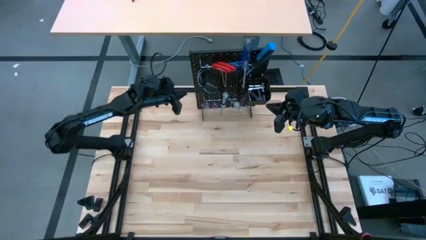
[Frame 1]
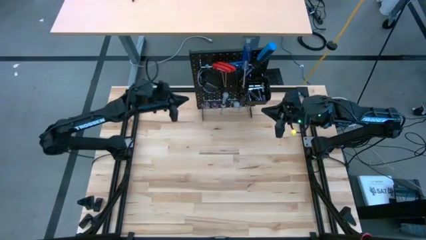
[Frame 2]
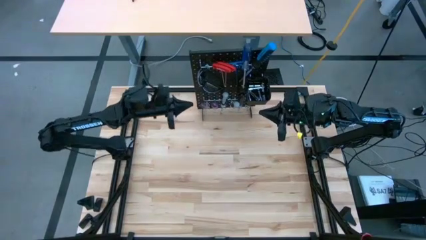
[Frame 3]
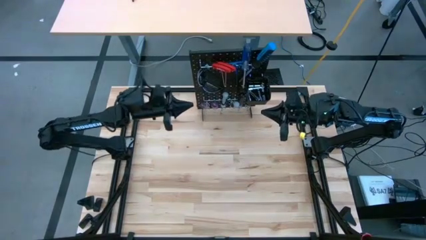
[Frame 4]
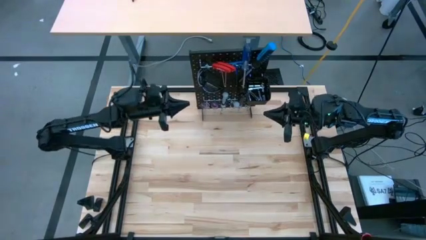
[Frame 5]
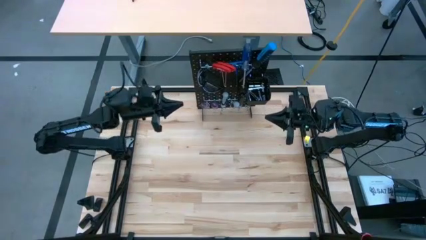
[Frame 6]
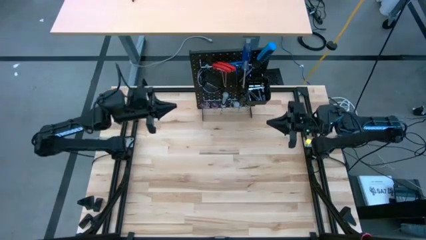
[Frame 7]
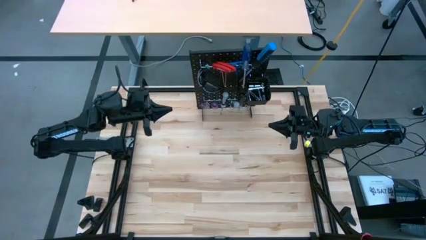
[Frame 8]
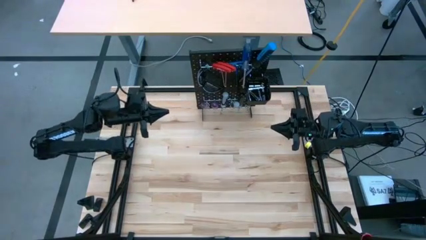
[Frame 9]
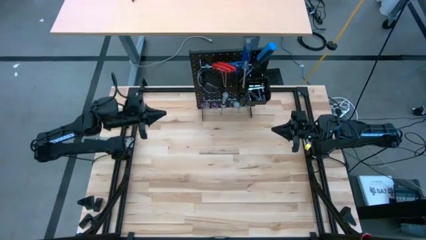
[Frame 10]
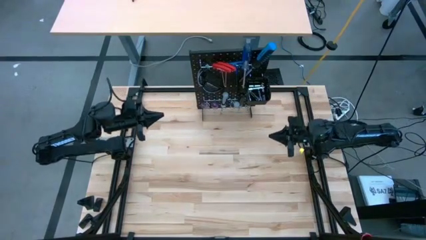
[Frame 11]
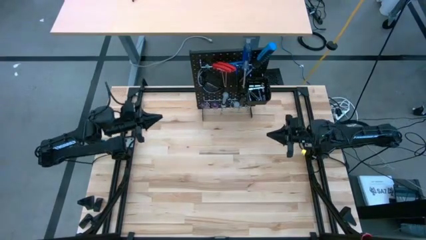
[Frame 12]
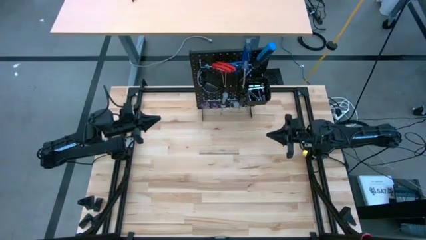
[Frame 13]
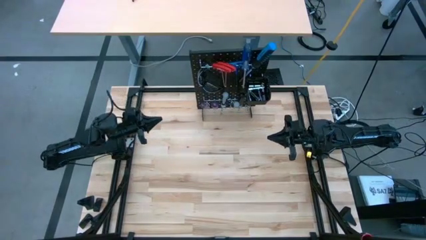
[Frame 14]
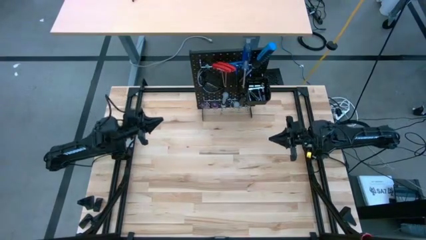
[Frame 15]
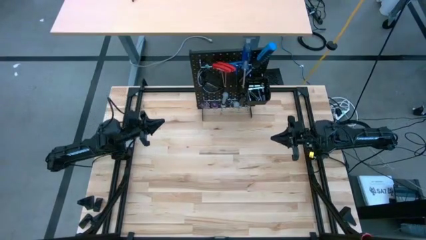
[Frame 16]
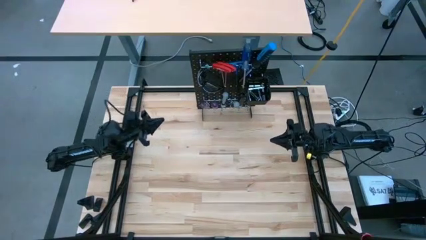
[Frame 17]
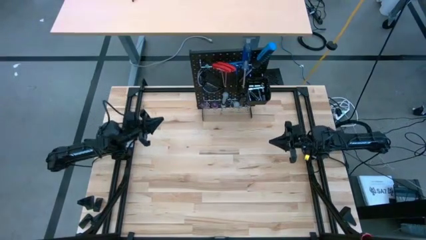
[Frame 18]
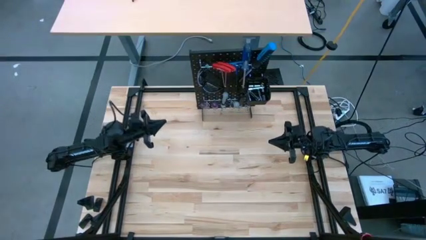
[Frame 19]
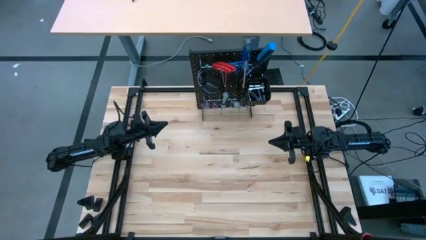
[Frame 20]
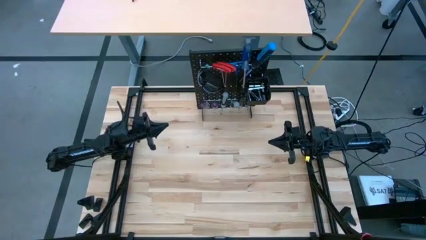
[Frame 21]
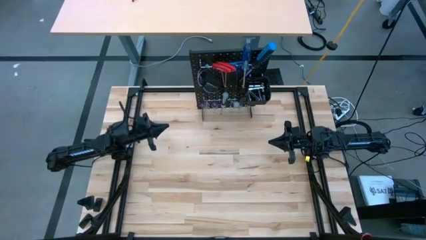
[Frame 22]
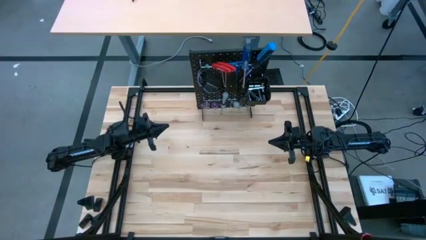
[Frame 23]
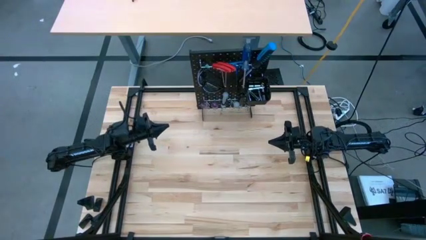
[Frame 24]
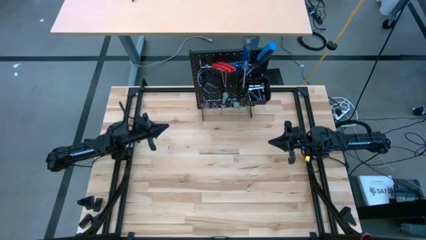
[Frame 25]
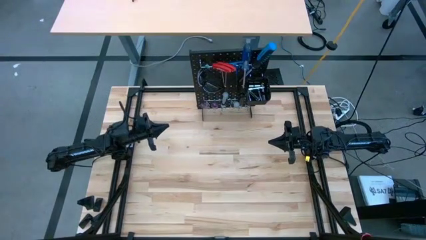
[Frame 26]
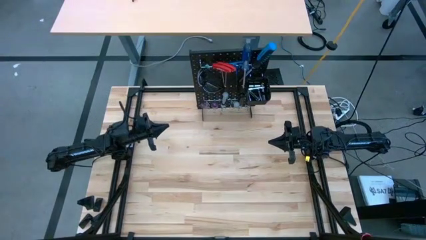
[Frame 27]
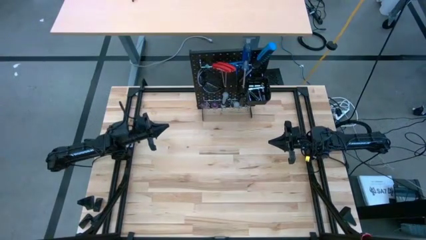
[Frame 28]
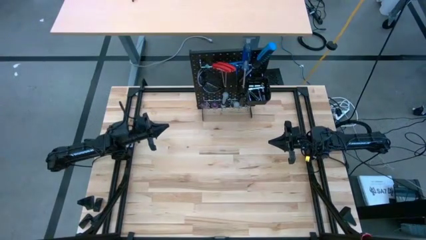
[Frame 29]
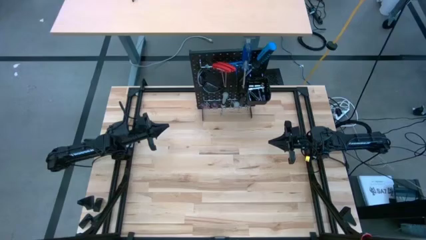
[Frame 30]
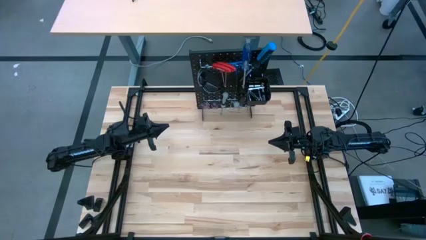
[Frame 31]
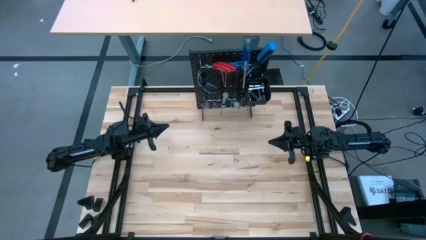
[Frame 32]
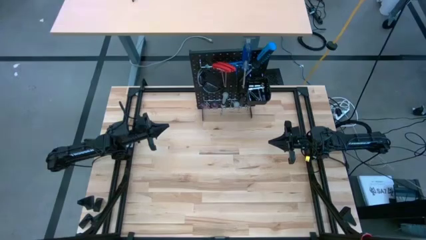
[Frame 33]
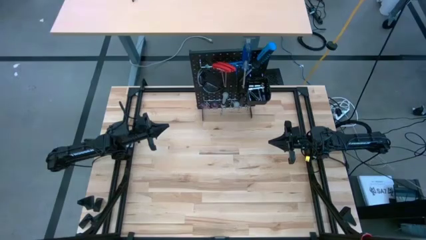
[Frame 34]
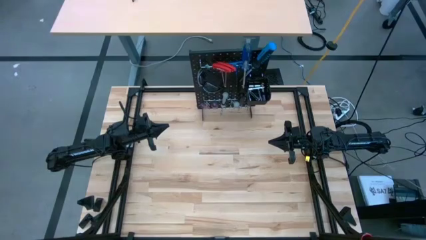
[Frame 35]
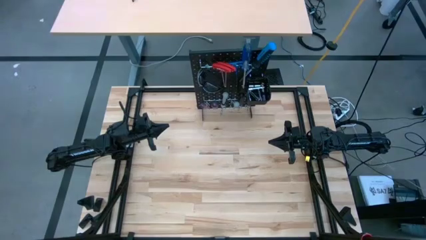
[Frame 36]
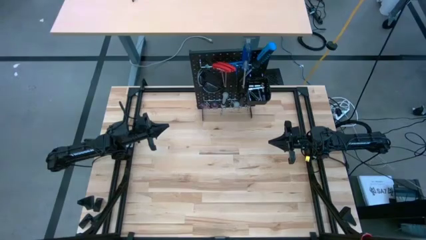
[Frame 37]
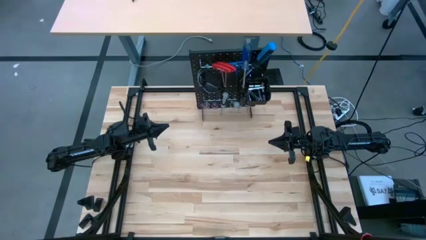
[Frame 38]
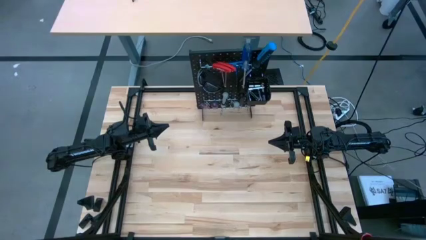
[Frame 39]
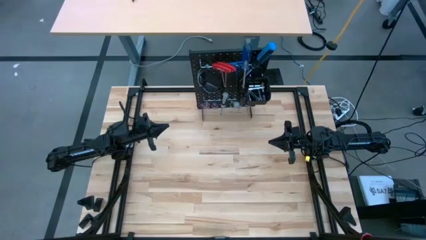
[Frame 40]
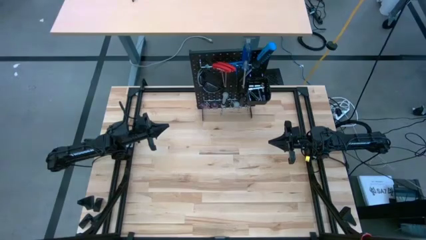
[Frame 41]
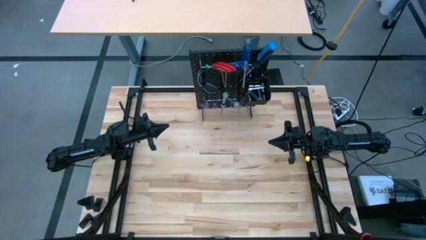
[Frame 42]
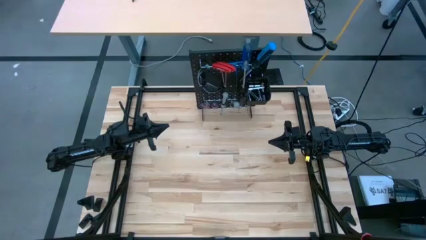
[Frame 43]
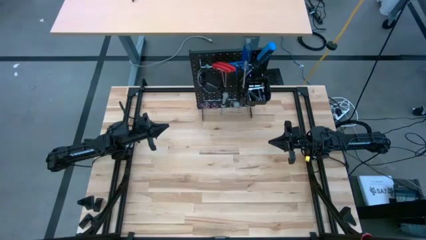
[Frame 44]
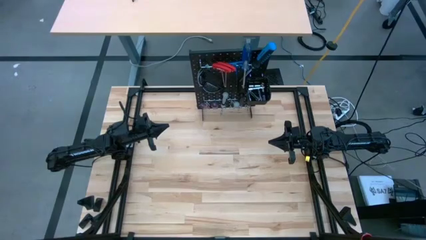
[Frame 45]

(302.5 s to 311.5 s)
Task: Hang tools onto peg board
Return to Home Position

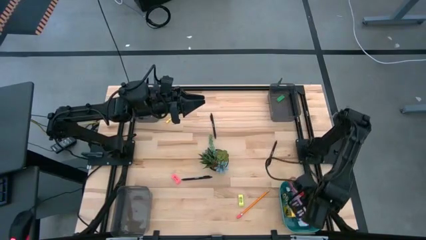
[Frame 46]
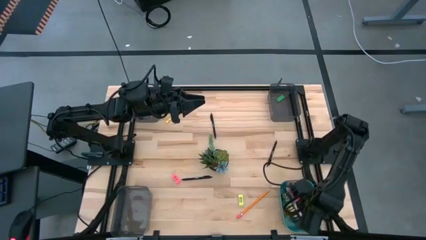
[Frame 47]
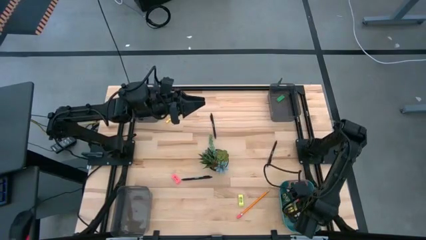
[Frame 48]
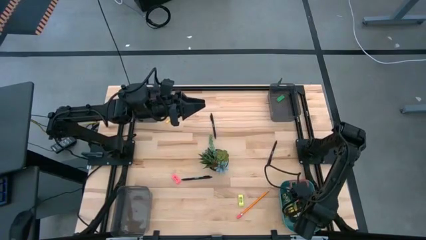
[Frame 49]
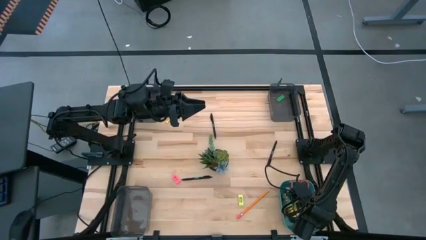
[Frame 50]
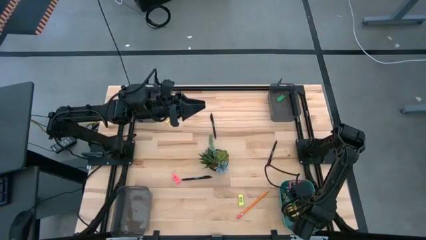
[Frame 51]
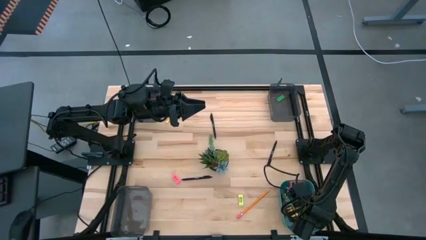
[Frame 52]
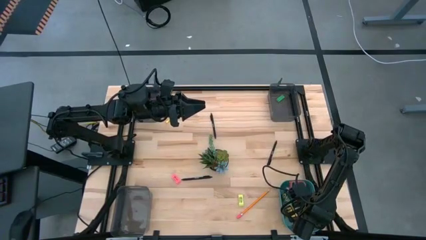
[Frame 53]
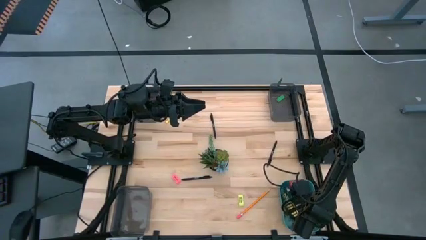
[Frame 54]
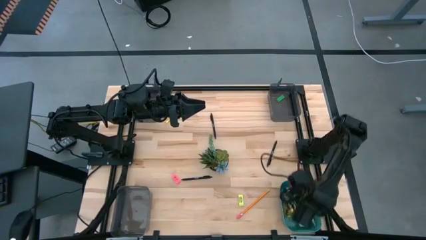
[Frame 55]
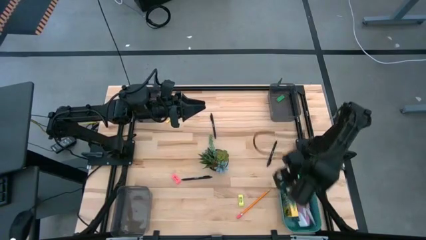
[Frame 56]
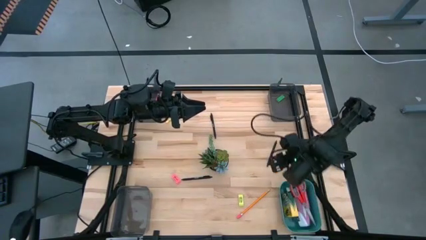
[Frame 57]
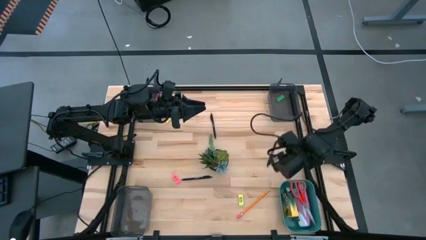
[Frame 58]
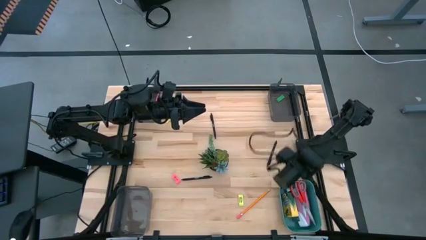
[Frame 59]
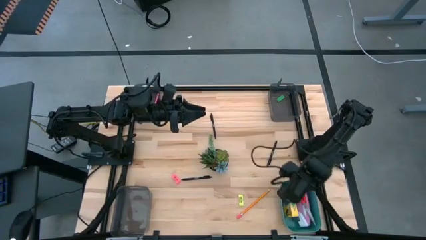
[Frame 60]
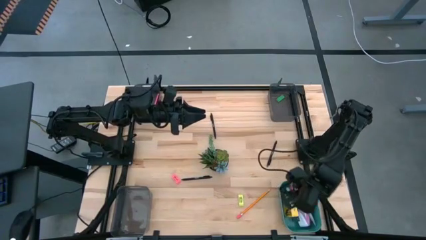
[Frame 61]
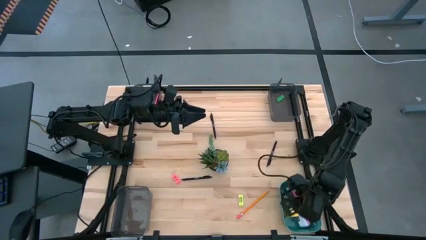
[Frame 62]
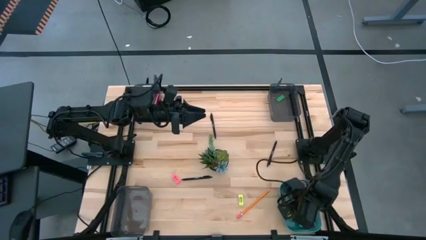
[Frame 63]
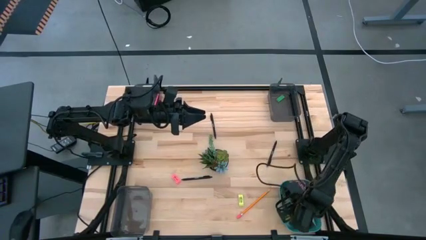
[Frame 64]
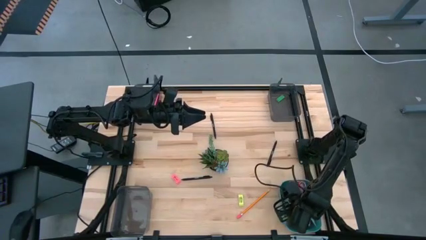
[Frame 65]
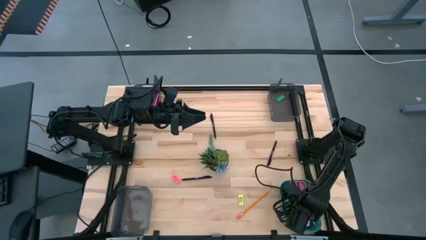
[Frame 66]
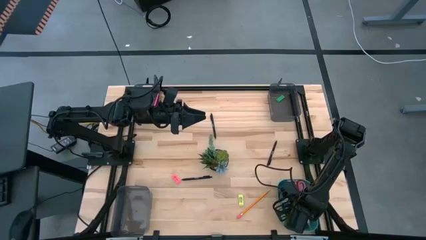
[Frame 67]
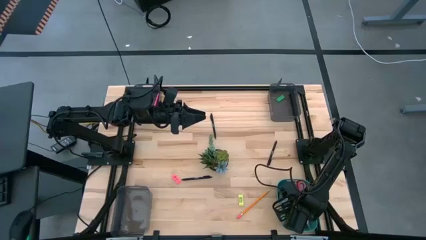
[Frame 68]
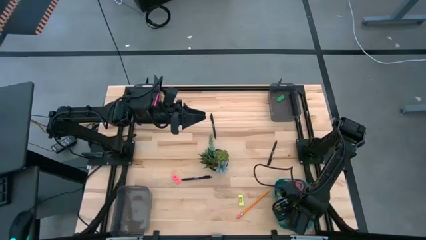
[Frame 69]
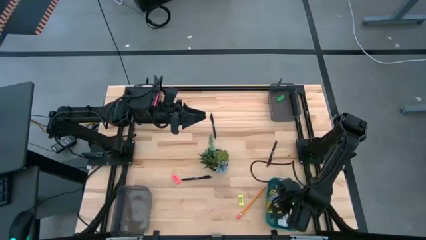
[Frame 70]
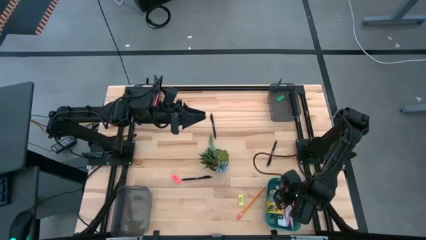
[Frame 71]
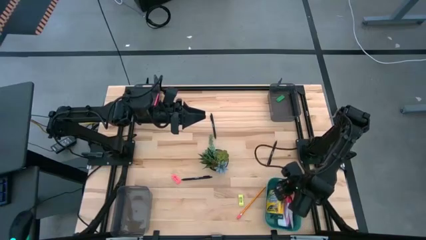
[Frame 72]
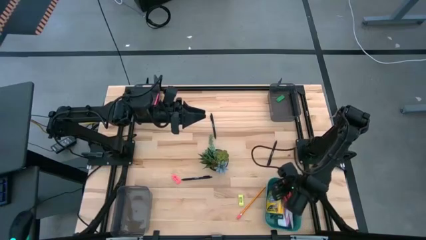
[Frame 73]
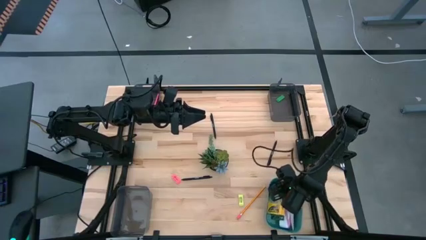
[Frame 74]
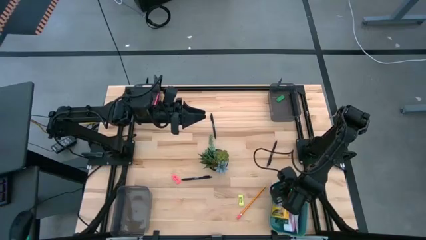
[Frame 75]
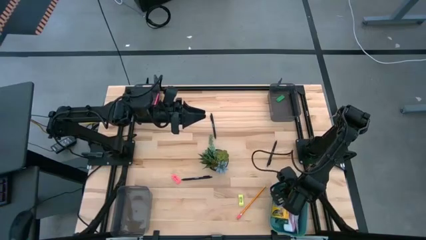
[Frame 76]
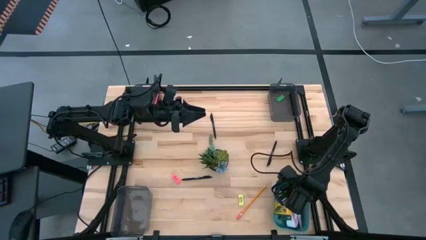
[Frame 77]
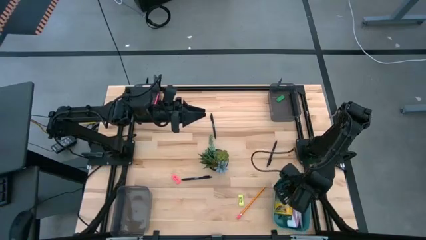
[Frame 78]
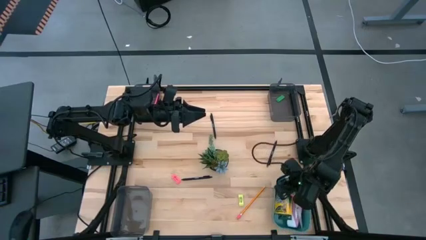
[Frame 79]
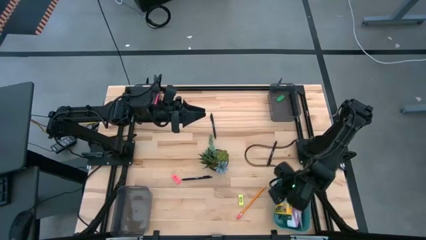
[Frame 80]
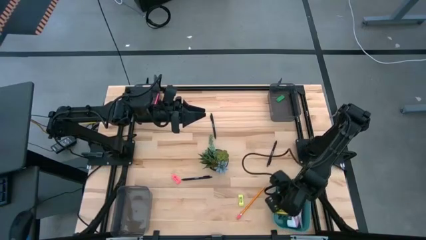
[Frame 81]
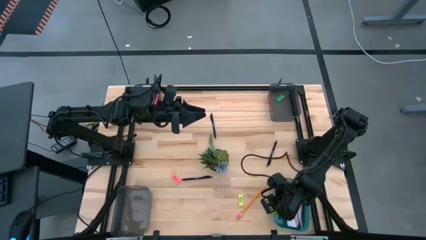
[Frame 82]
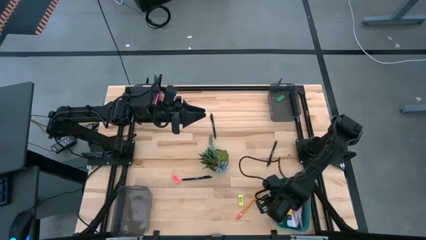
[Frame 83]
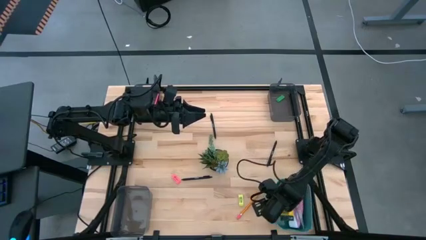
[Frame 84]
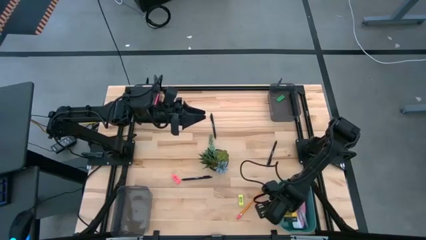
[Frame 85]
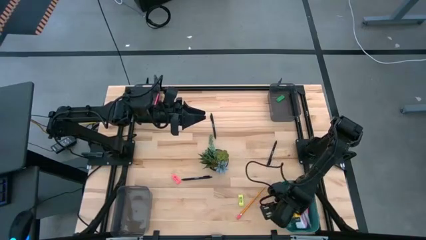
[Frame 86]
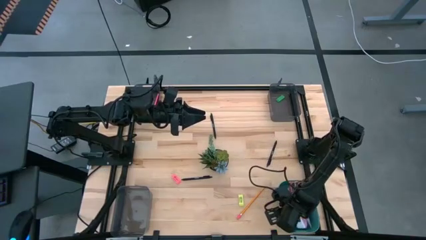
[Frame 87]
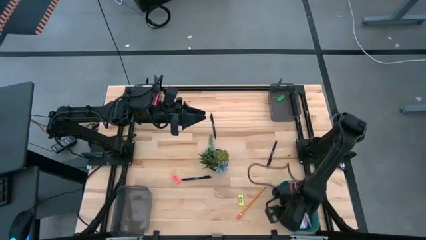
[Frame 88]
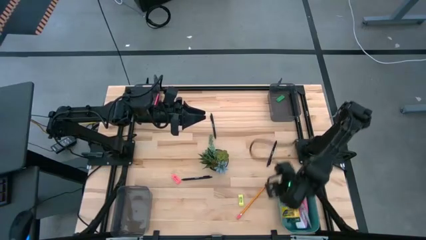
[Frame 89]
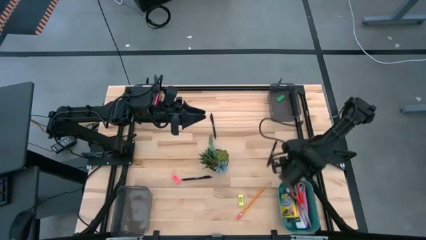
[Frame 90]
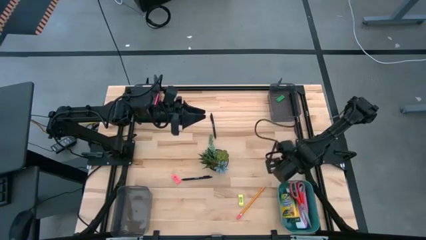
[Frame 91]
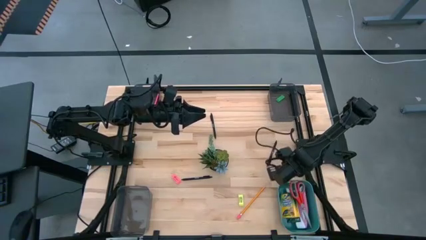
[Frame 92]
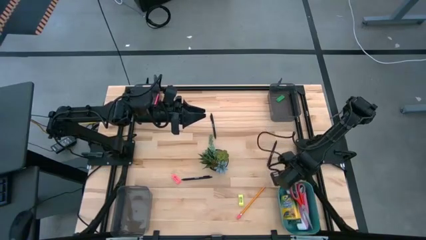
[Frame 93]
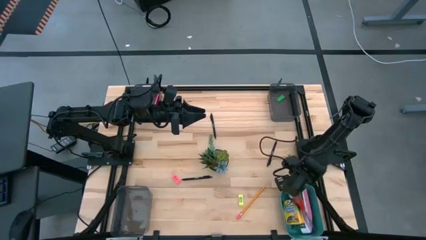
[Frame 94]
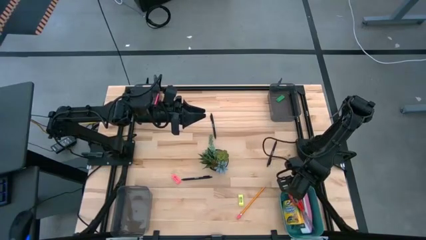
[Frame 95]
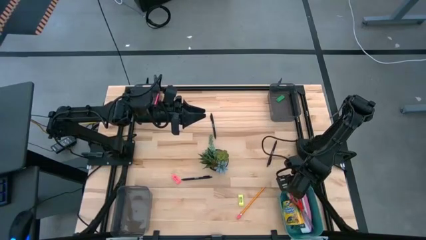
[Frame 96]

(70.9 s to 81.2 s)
Task: Sort crayons/erasers/pens/pencils in bins
Put the red scissors into the green bin
